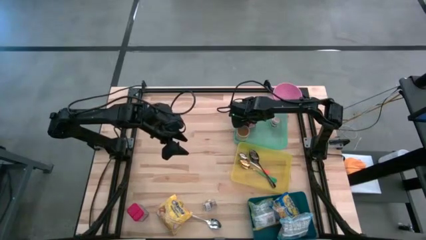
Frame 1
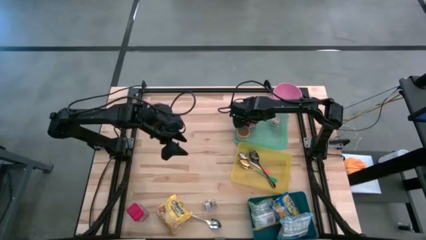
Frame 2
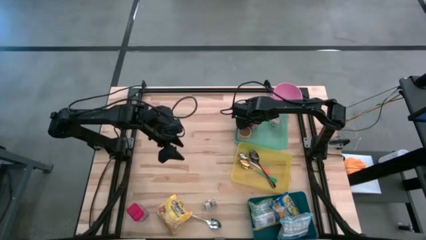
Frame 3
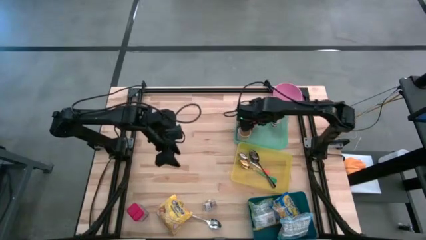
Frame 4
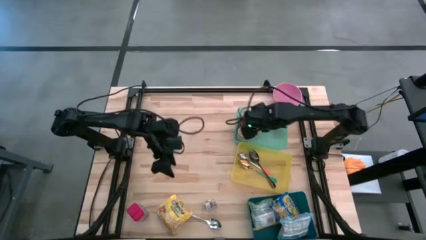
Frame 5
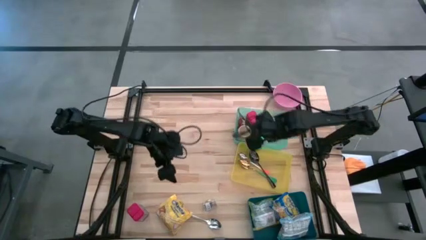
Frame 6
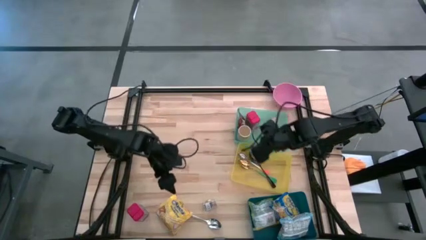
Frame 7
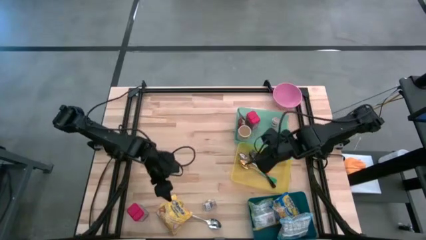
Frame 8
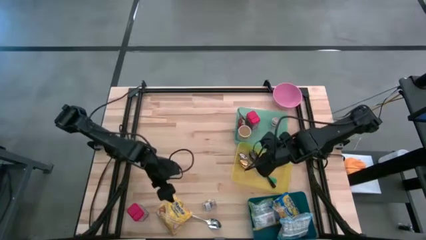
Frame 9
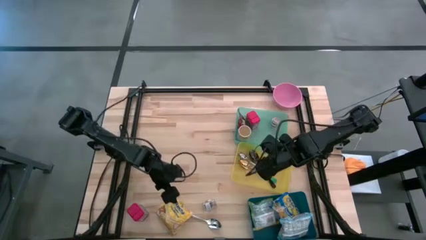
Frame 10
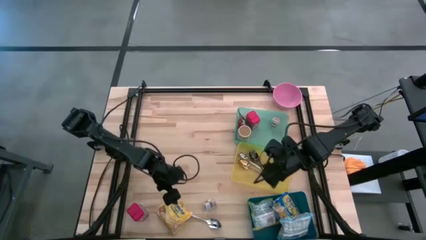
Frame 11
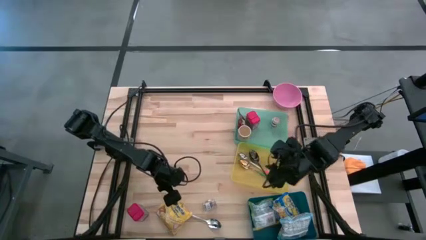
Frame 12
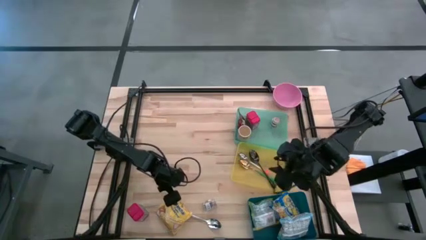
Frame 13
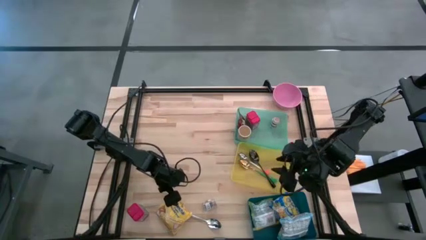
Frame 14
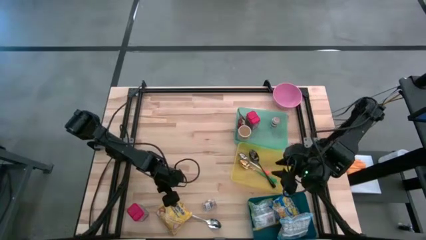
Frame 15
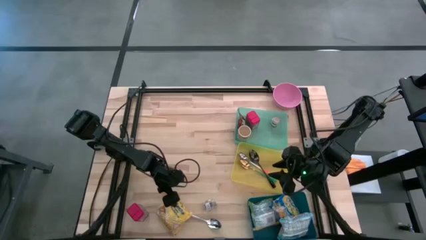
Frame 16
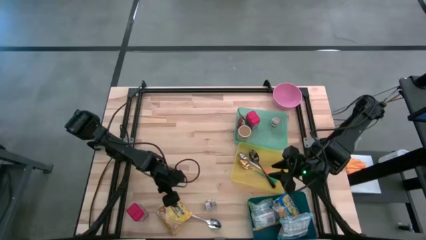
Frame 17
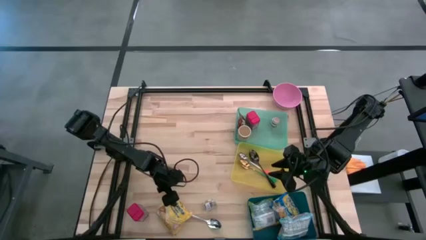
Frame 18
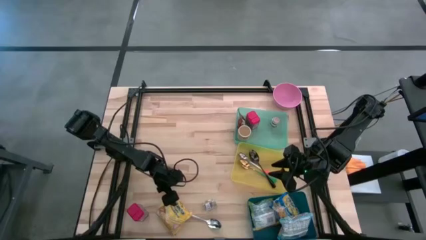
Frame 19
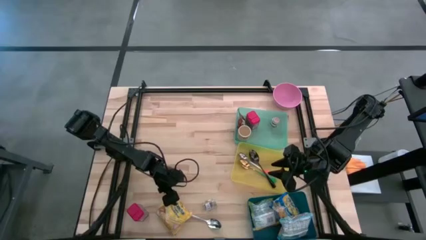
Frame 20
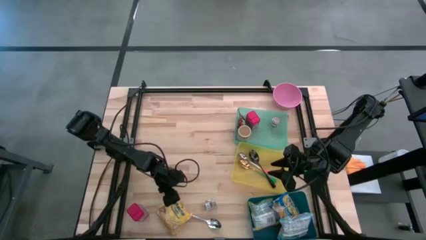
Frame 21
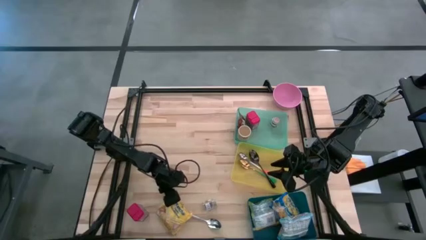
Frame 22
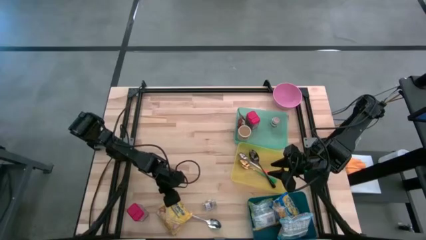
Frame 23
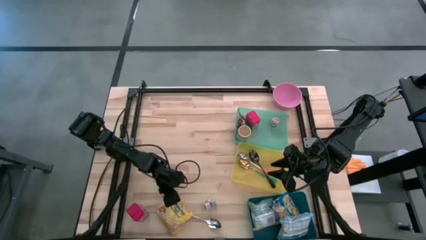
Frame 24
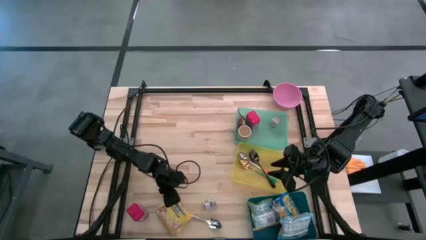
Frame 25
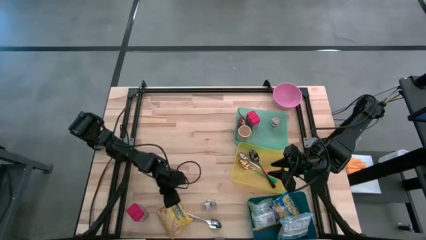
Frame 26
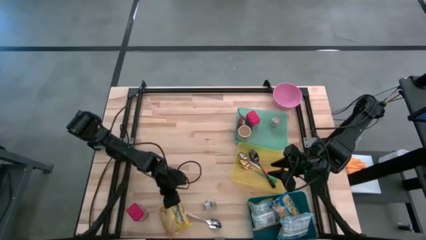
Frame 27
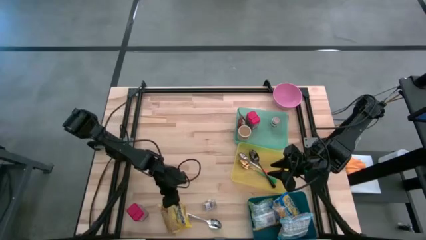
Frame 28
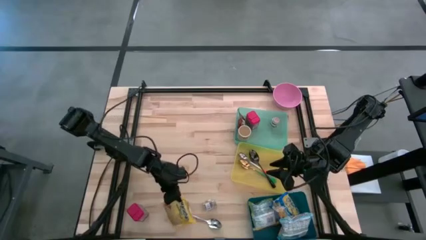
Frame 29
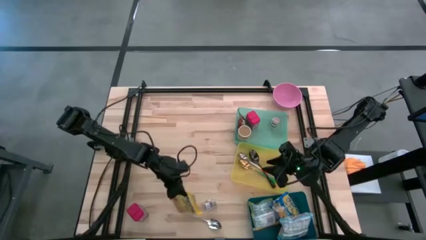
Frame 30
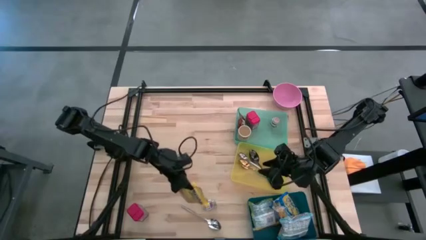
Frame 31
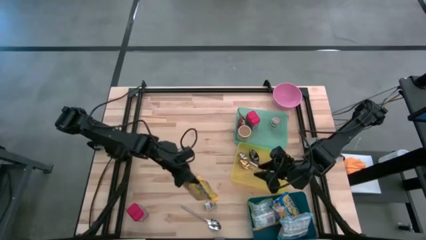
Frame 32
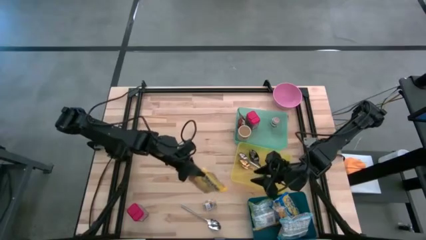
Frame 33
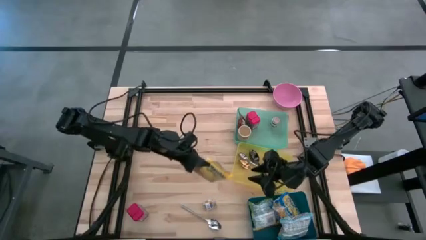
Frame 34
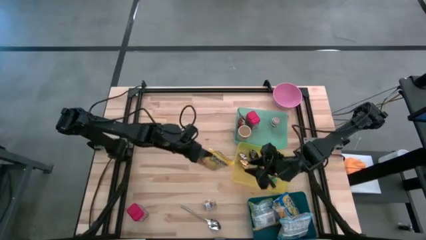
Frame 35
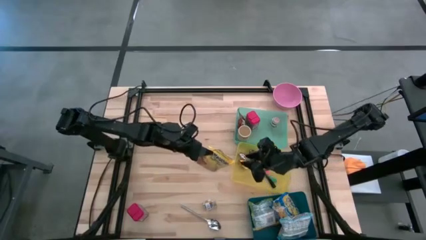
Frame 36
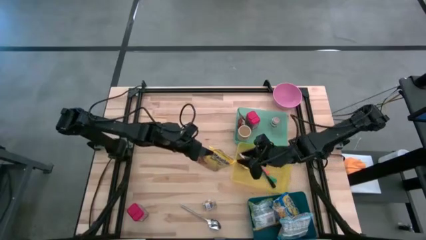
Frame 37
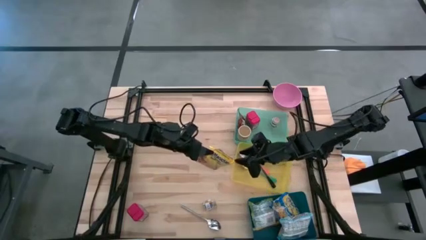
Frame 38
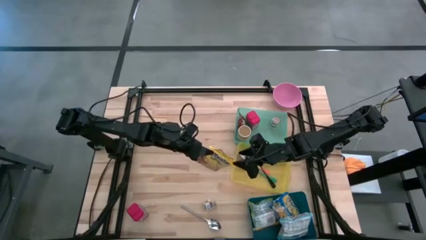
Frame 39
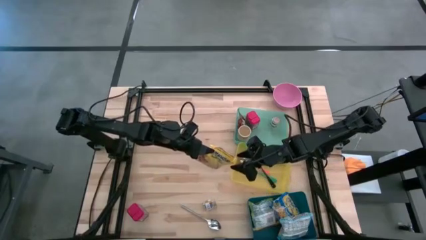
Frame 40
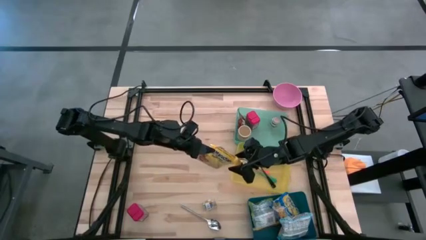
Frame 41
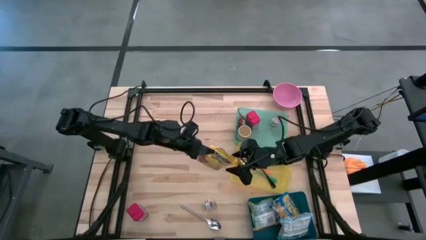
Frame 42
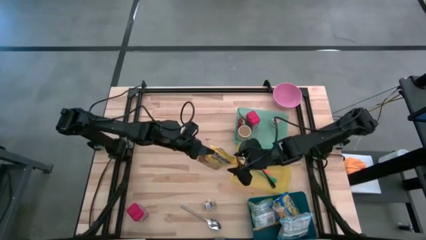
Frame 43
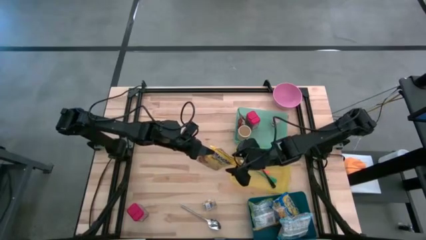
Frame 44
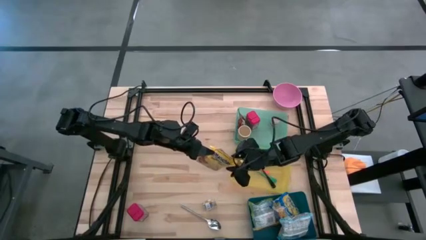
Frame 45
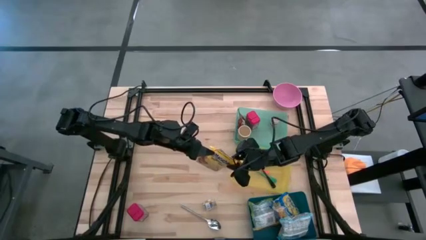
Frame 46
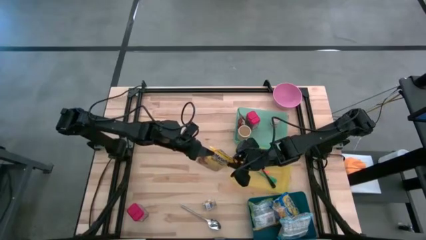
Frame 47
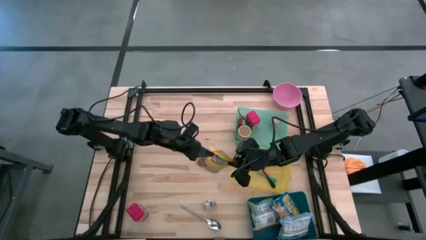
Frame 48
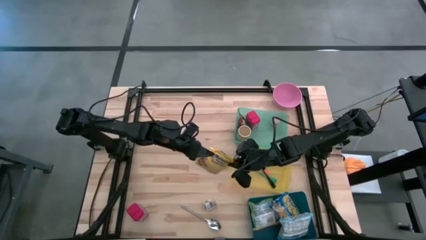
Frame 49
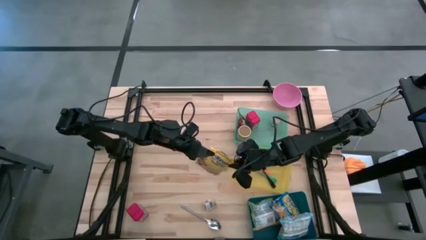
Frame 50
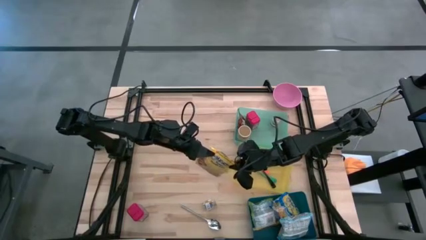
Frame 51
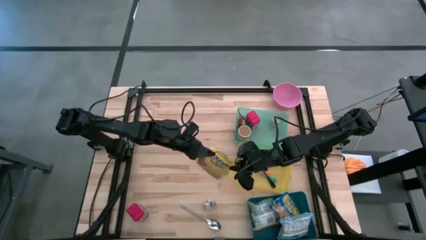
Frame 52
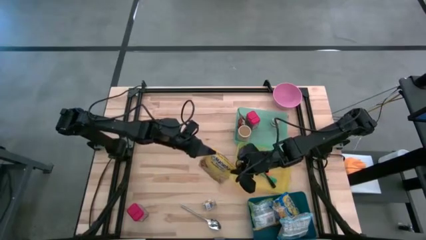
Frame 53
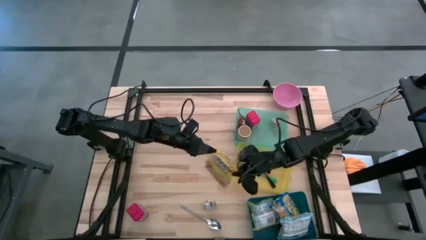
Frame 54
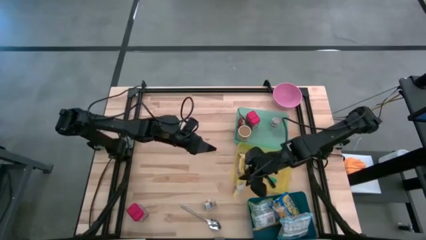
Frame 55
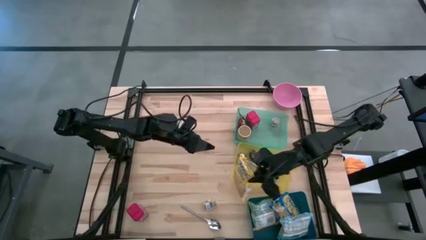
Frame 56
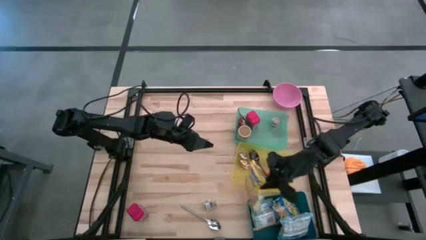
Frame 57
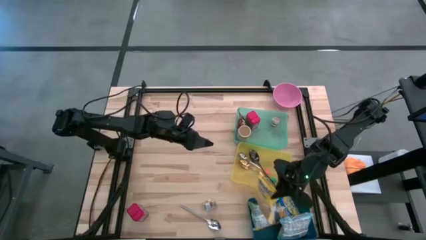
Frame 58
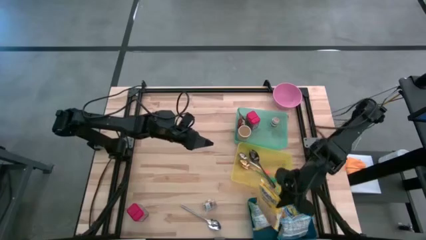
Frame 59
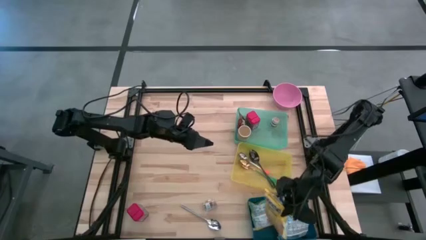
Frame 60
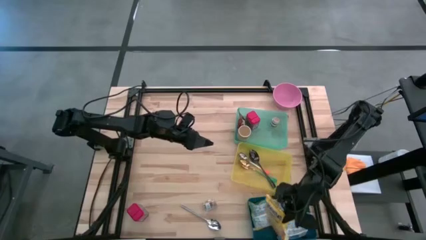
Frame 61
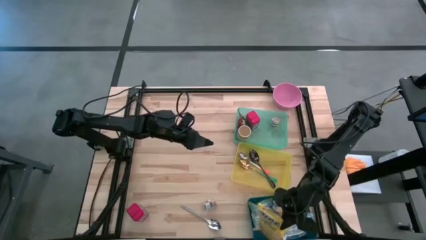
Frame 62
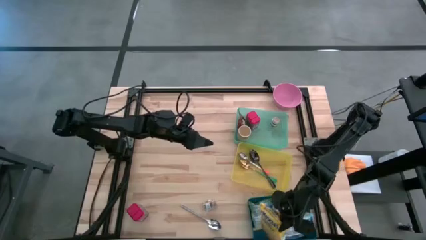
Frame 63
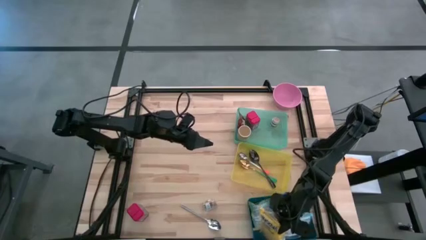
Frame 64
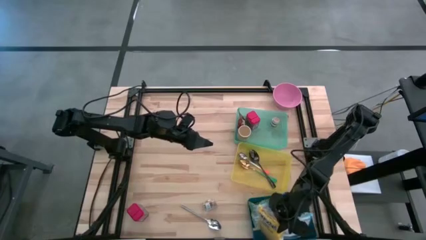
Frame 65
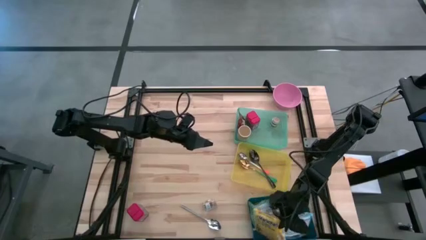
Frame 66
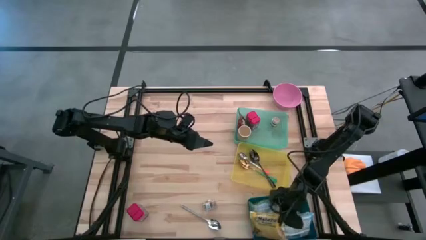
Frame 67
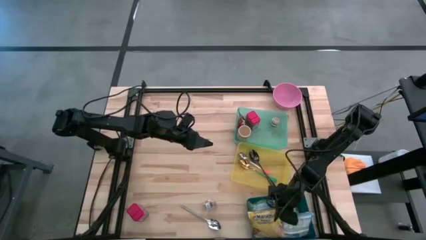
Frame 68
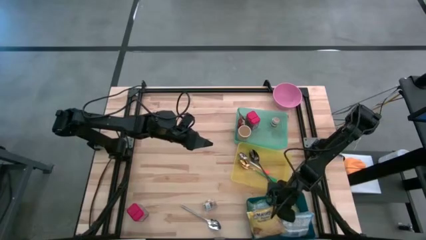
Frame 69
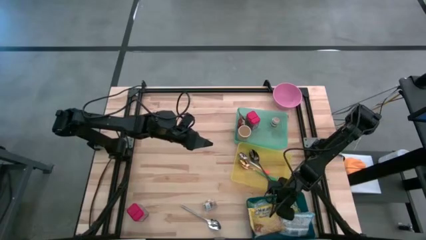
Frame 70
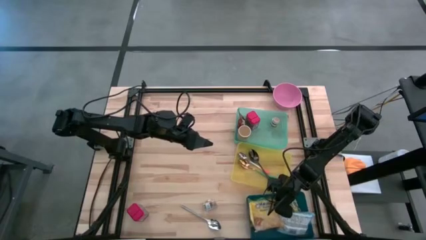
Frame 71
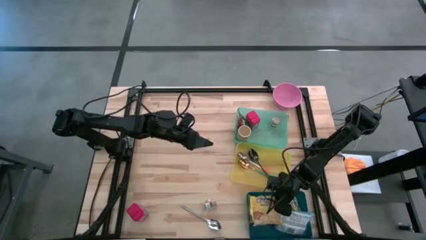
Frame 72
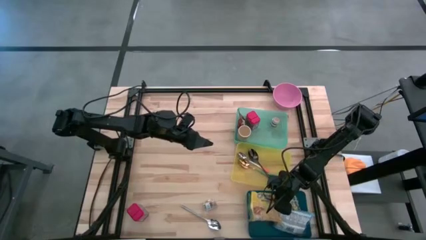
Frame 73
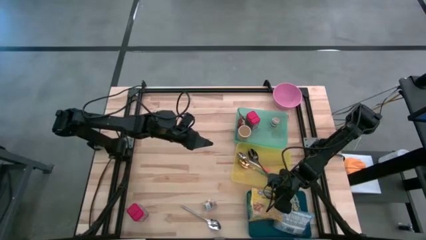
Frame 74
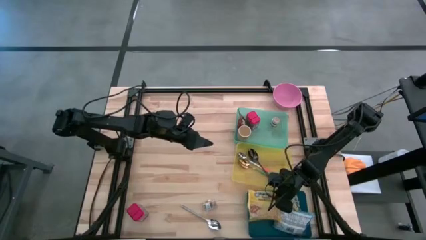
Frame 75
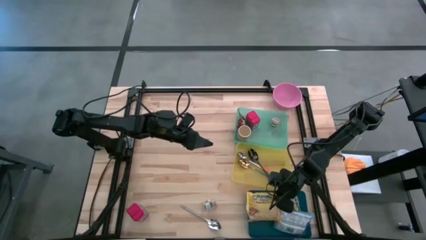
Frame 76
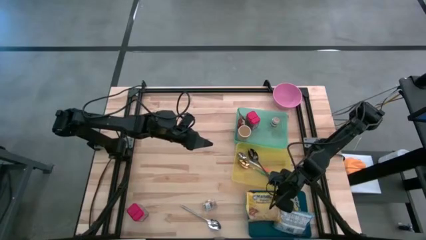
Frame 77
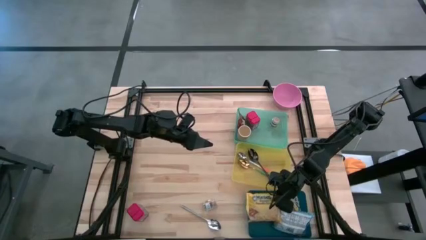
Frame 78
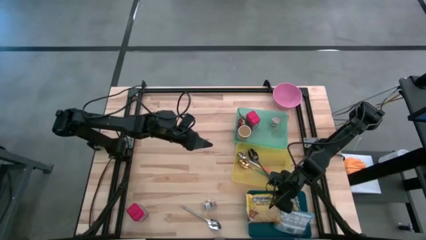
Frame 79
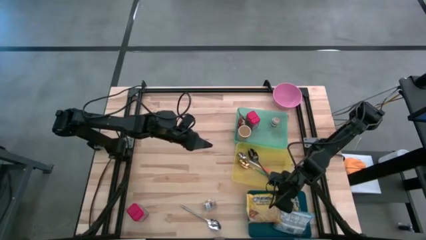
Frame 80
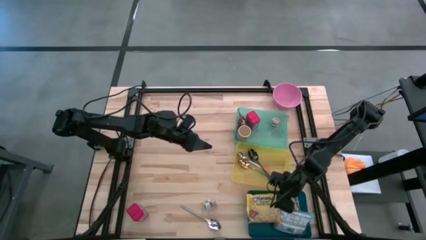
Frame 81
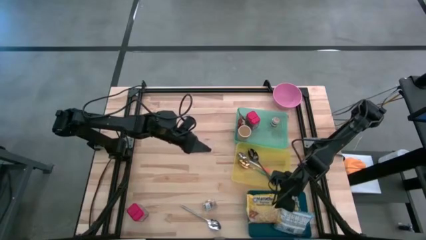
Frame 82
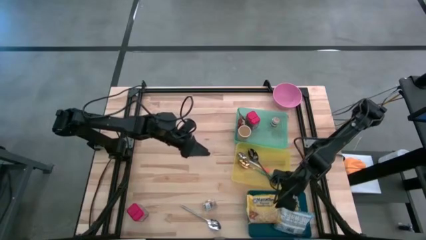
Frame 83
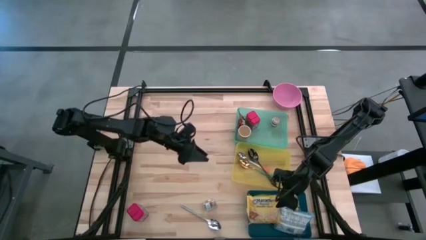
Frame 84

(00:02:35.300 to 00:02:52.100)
Put the yellow noodle pack into the blue bin
